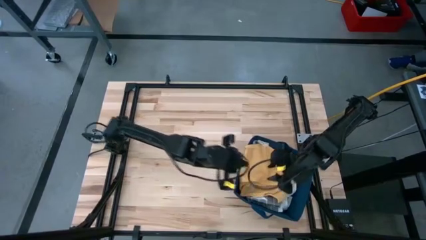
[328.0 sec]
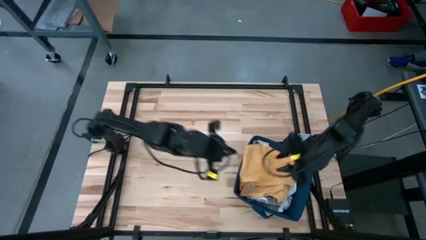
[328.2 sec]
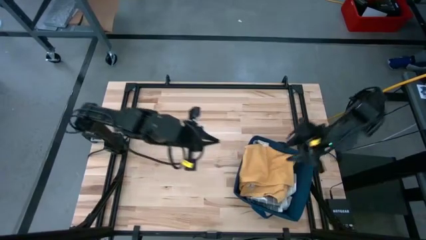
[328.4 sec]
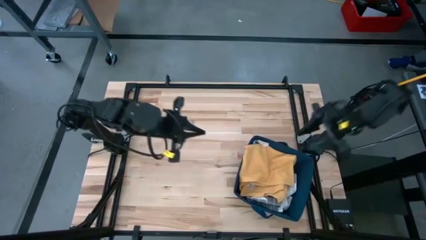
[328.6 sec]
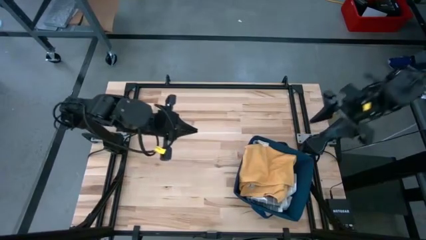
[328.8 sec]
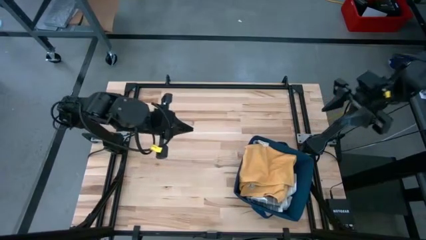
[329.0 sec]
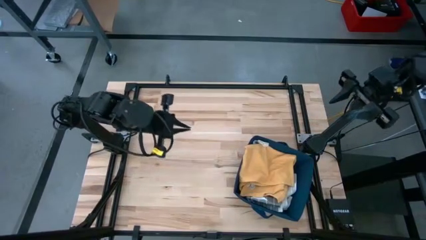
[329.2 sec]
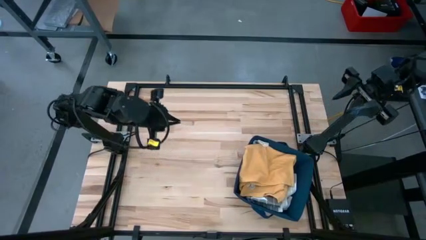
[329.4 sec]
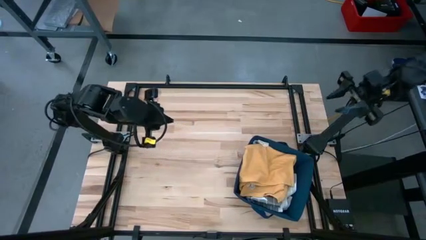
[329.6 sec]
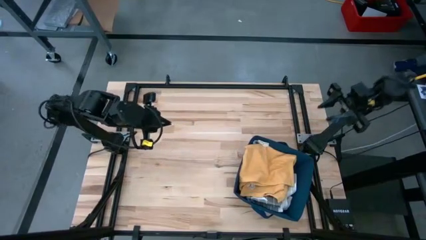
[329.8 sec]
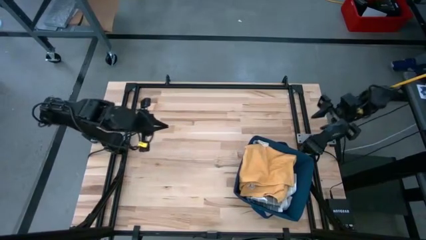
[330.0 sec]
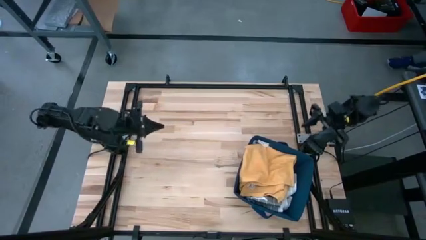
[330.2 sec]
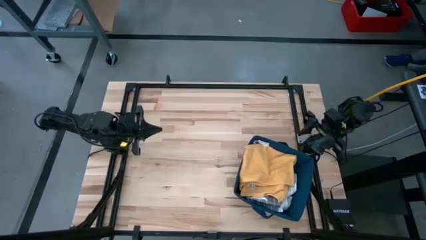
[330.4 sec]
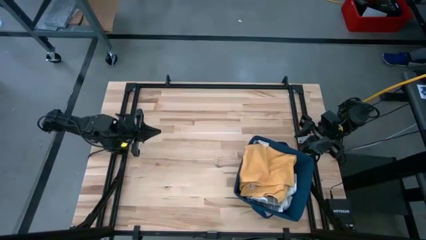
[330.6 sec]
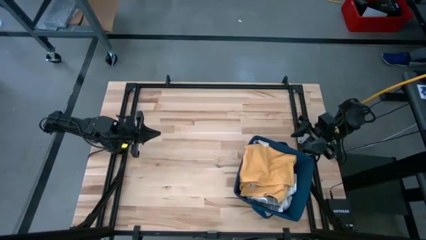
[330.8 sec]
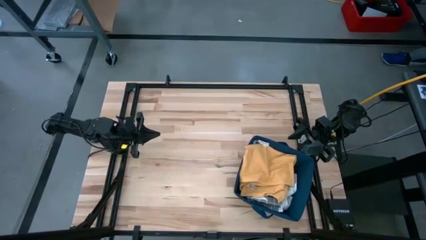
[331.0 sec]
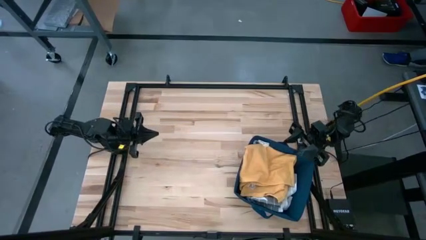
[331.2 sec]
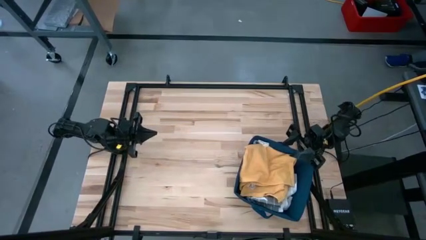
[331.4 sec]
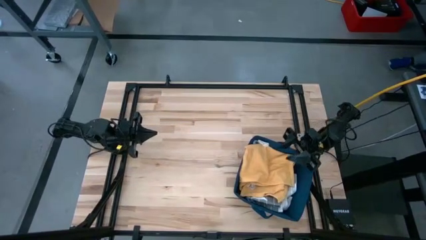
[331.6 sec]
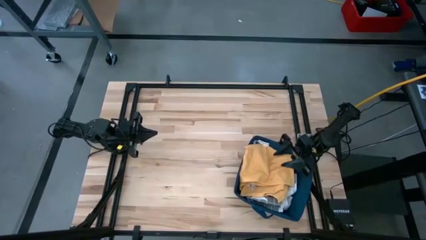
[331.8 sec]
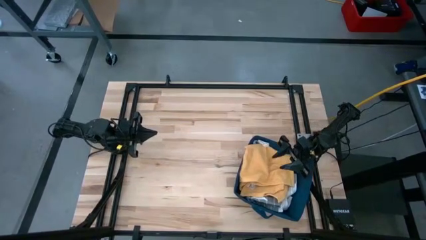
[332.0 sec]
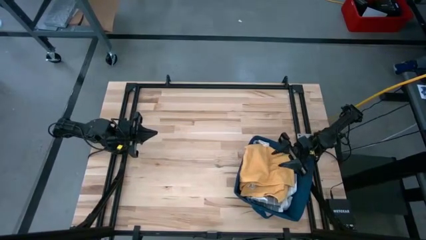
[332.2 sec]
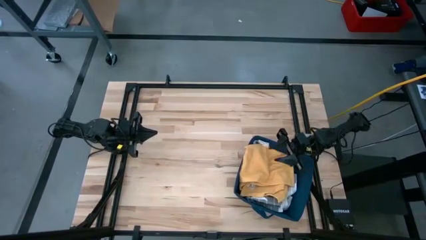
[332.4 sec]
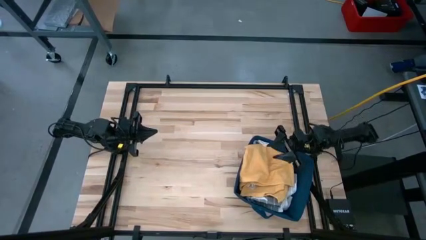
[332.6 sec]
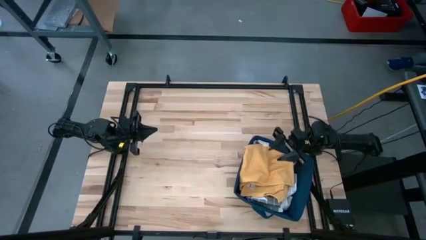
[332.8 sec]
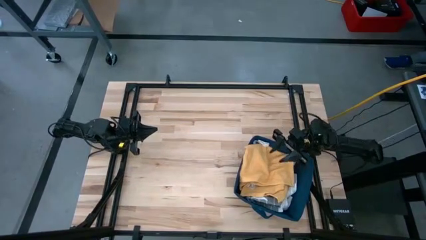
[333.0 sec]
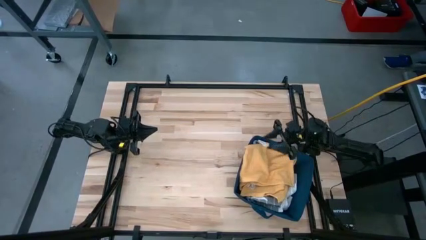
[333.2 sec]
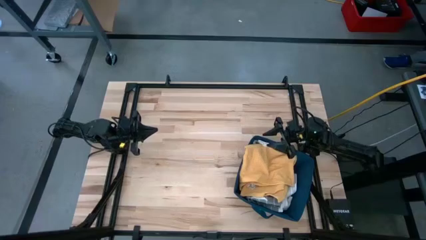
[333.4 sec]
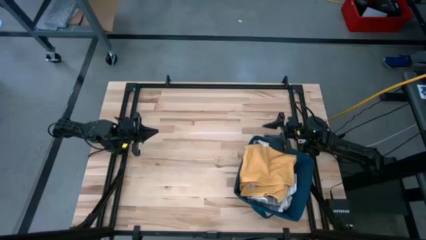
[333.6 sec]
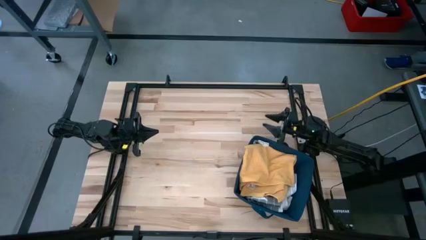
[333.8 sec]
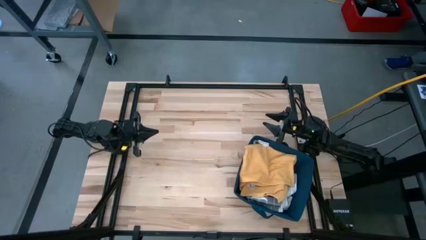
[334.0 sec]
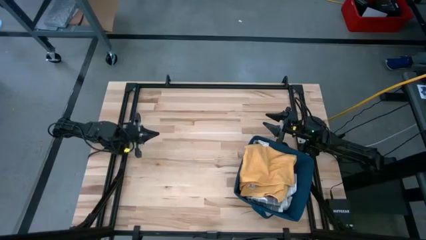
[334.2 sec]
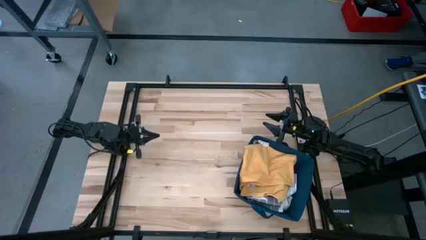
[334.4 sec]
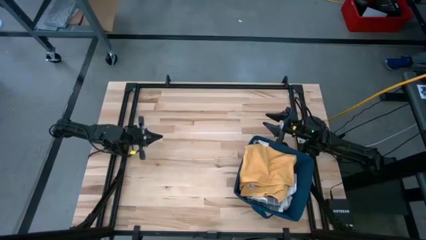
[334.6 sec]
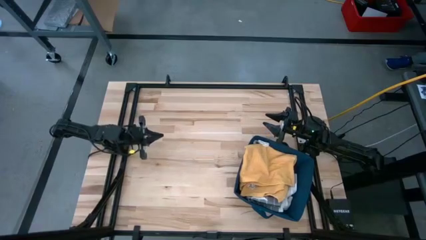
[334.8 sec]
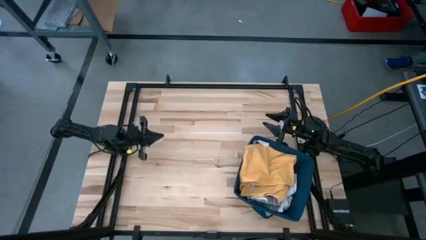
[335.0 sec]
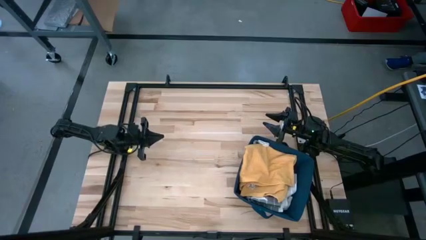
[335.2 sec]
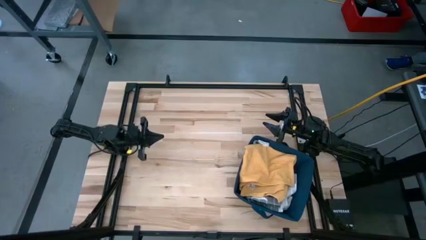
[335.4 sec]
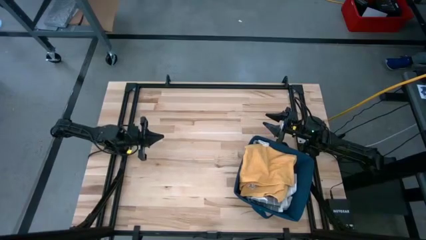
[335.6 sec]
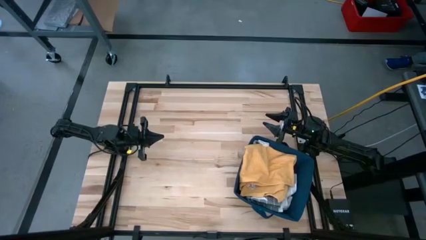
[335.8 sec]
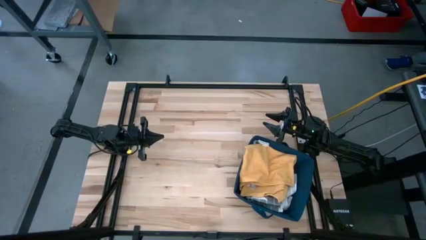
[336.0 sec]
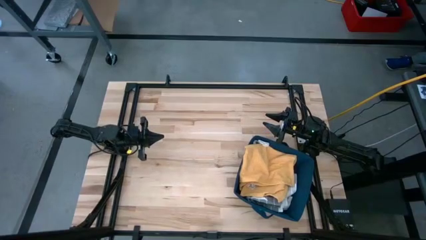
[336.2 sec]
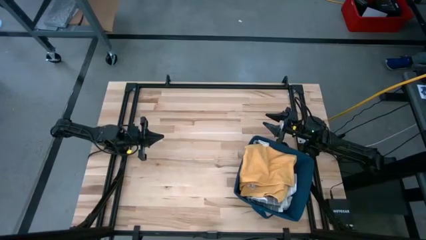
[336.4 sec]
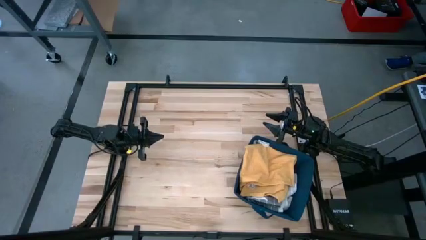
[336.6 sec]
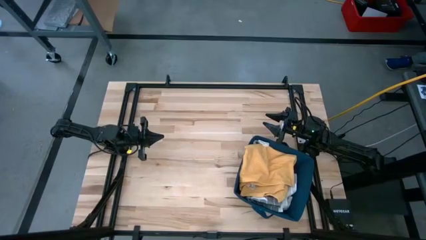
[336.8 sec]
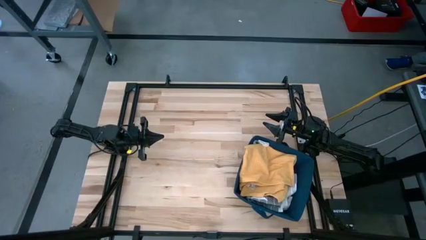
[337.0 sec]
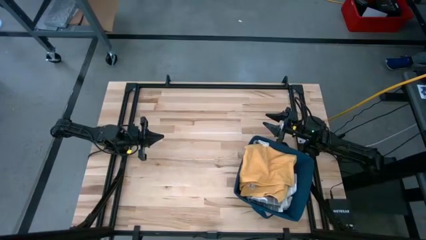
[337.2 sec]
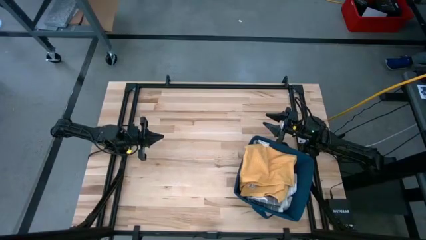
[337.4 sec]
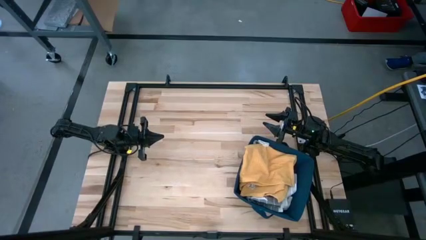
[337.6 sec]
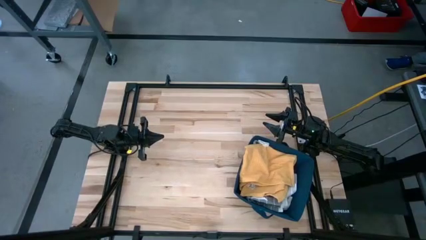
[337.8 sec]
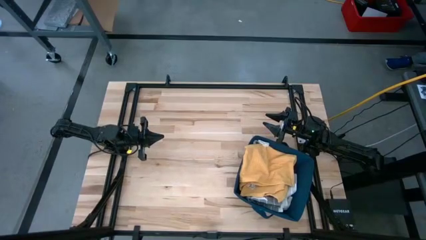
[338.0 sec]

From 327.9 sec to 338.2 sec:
Task: Fold towel
Return to Home Position
